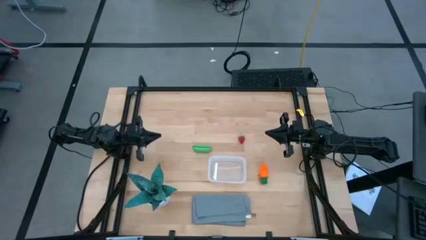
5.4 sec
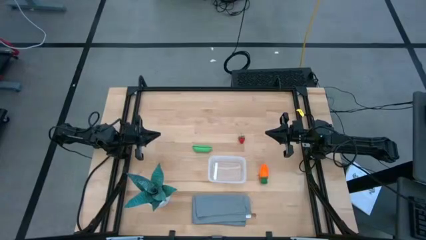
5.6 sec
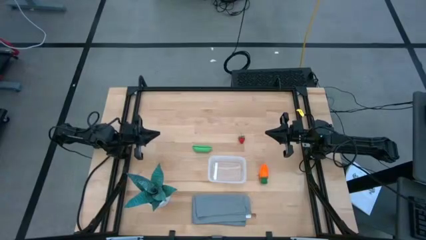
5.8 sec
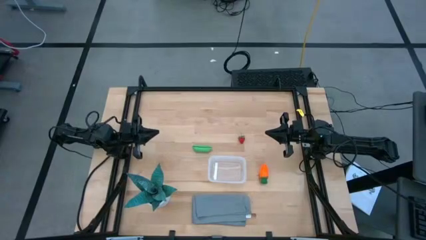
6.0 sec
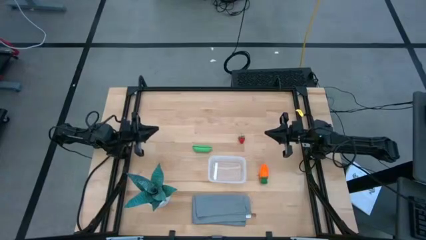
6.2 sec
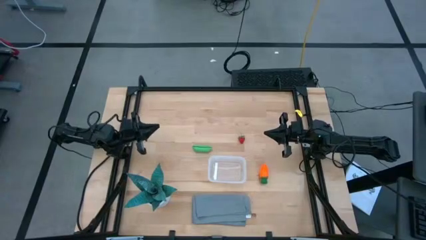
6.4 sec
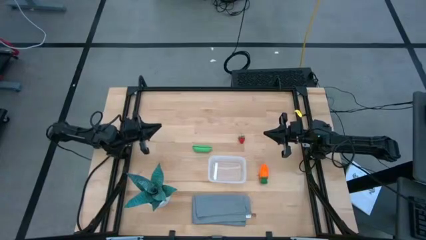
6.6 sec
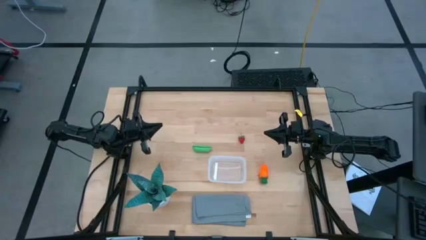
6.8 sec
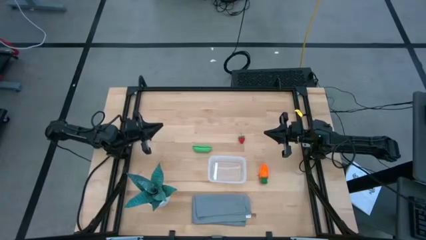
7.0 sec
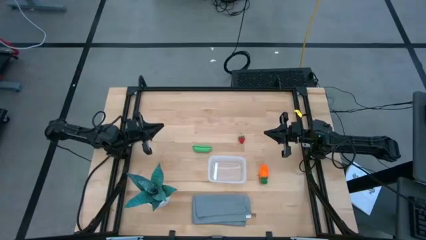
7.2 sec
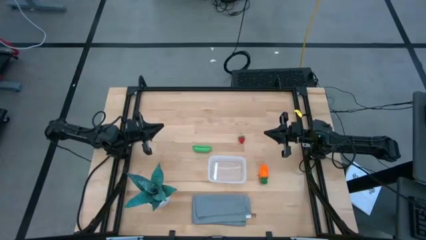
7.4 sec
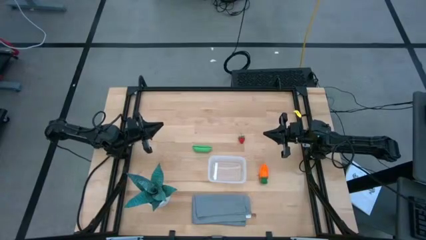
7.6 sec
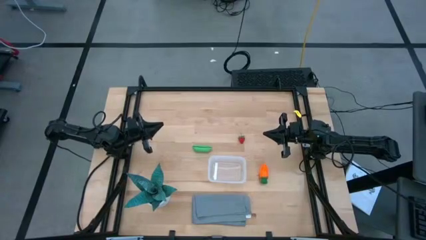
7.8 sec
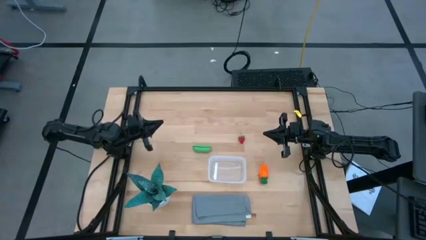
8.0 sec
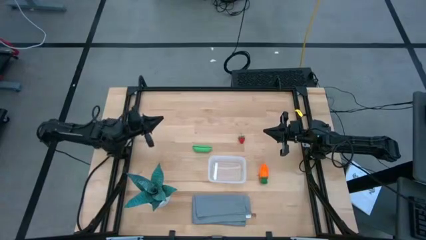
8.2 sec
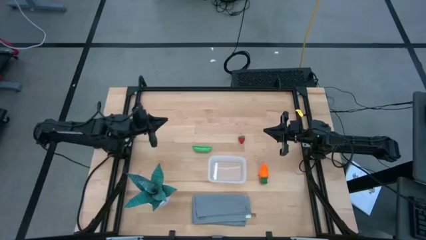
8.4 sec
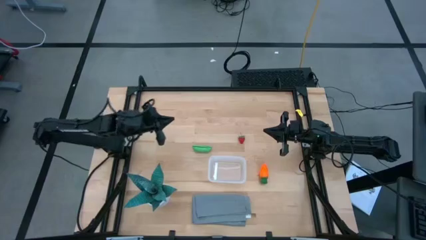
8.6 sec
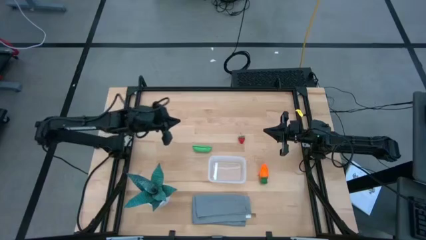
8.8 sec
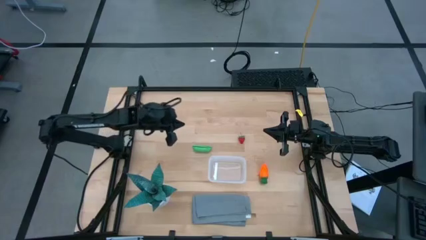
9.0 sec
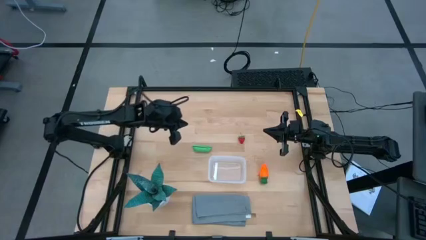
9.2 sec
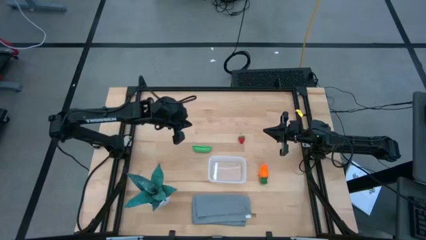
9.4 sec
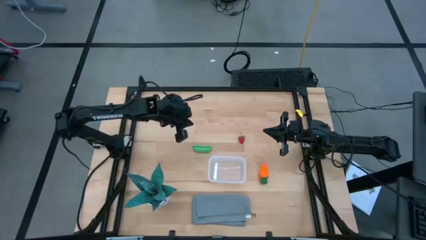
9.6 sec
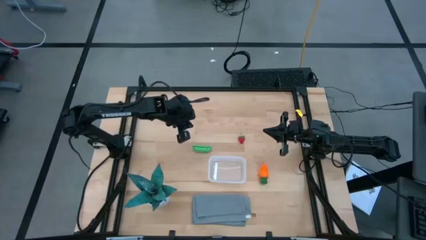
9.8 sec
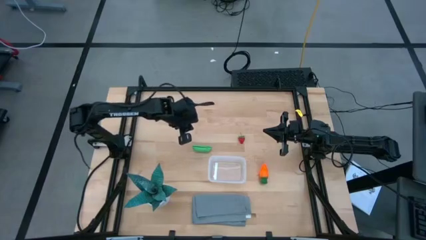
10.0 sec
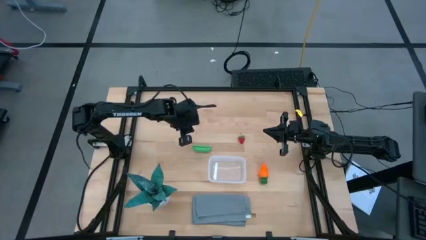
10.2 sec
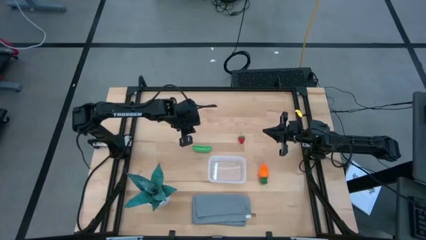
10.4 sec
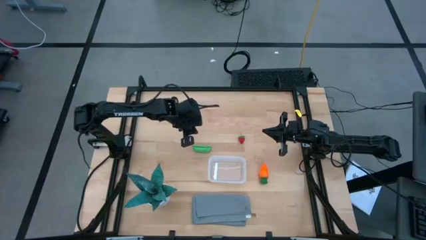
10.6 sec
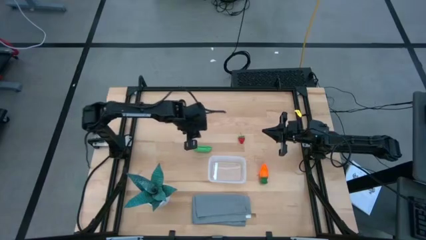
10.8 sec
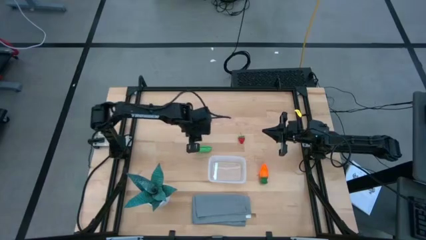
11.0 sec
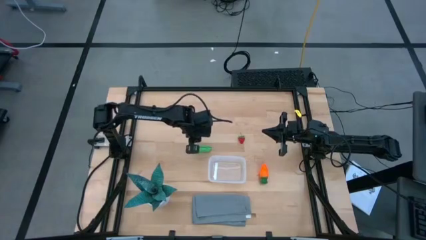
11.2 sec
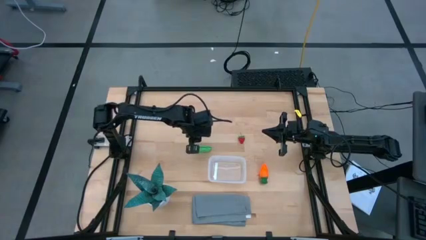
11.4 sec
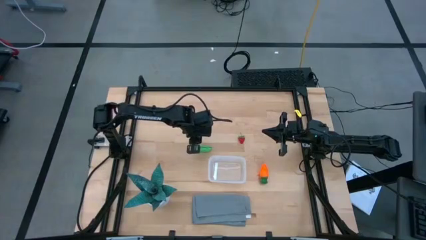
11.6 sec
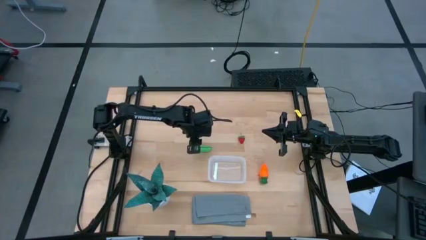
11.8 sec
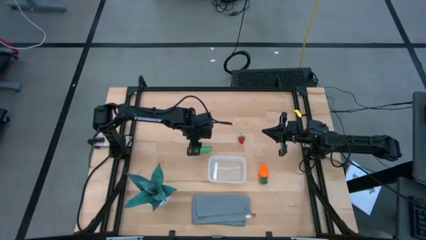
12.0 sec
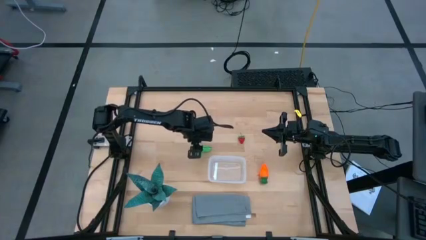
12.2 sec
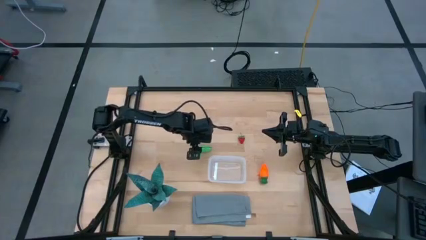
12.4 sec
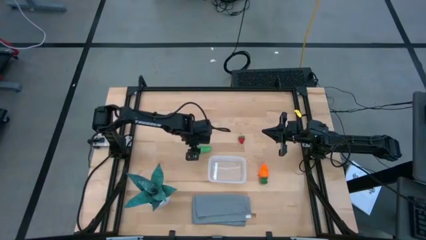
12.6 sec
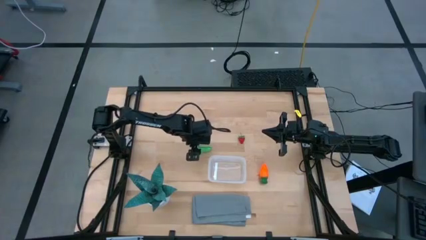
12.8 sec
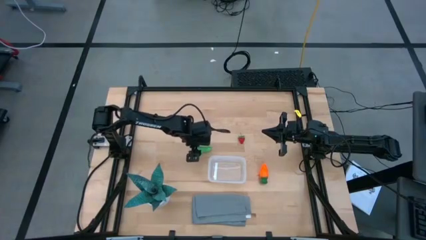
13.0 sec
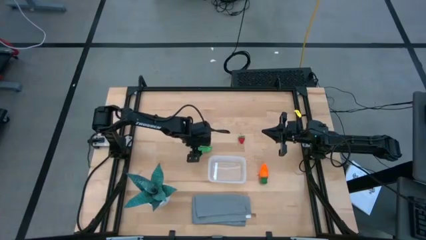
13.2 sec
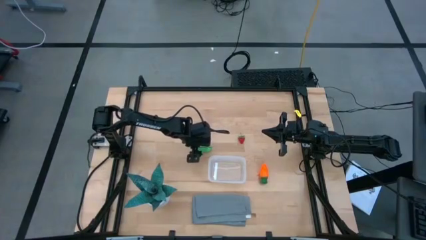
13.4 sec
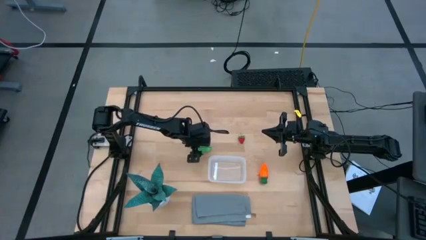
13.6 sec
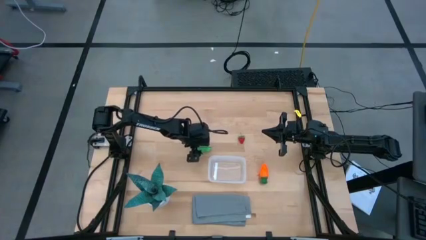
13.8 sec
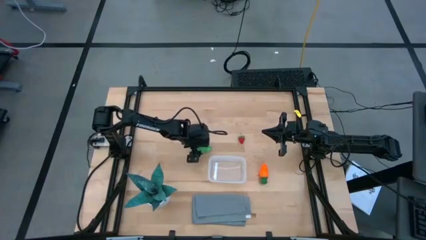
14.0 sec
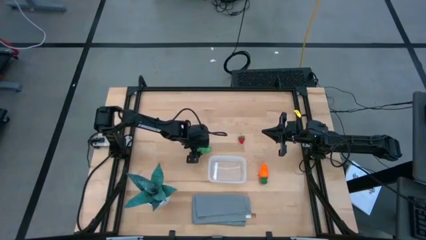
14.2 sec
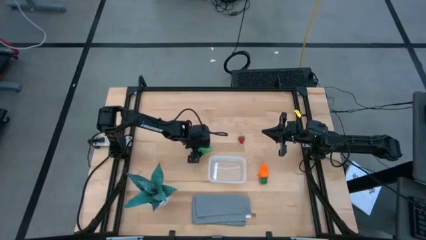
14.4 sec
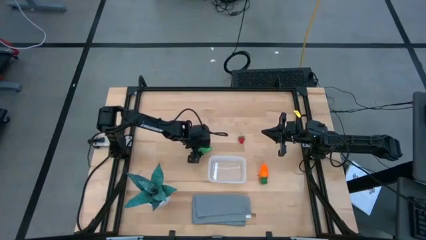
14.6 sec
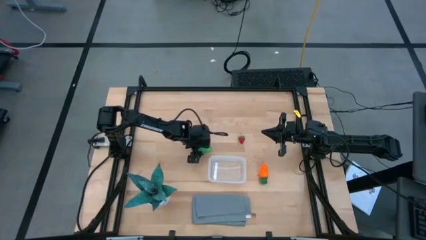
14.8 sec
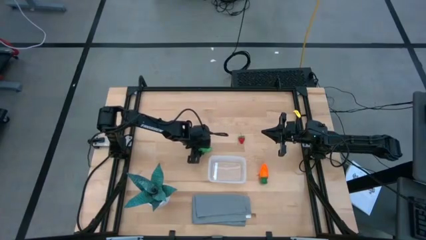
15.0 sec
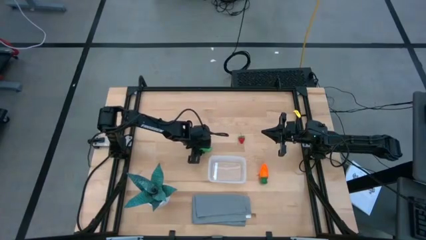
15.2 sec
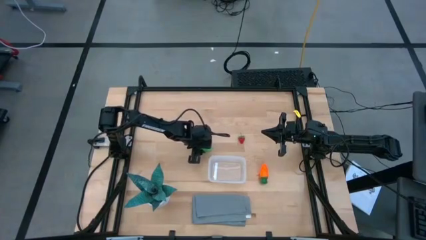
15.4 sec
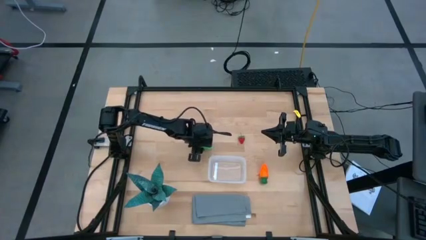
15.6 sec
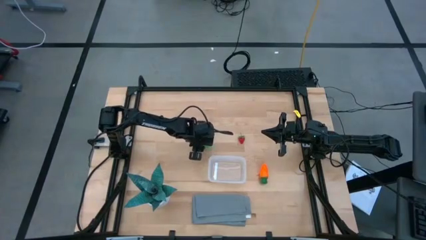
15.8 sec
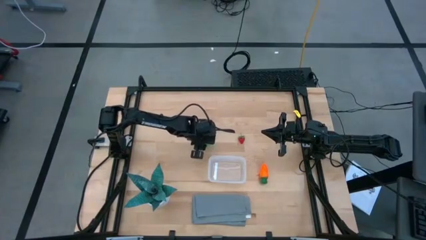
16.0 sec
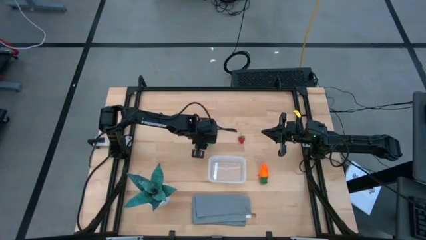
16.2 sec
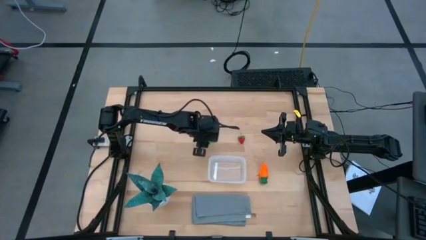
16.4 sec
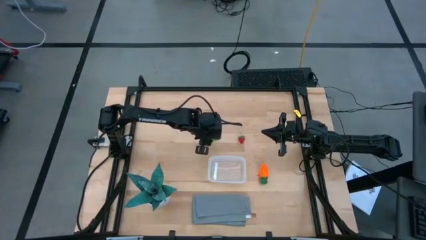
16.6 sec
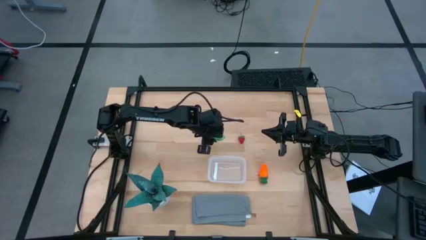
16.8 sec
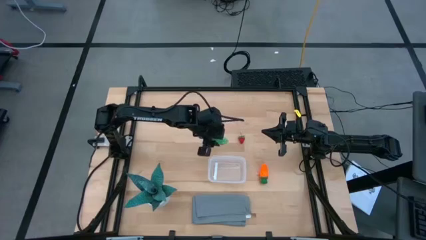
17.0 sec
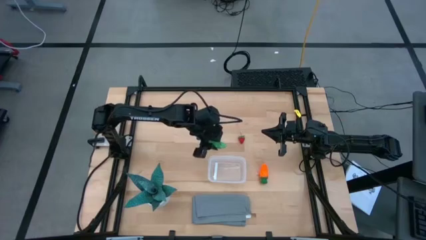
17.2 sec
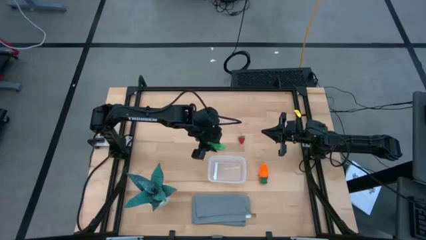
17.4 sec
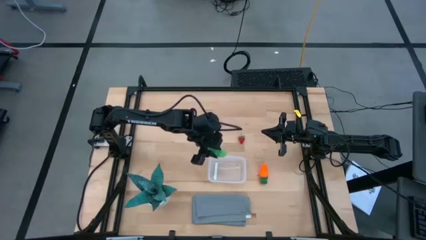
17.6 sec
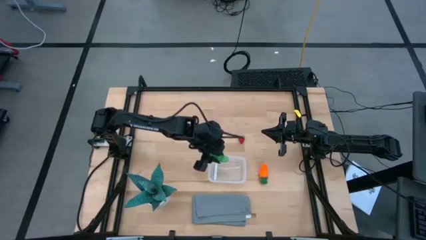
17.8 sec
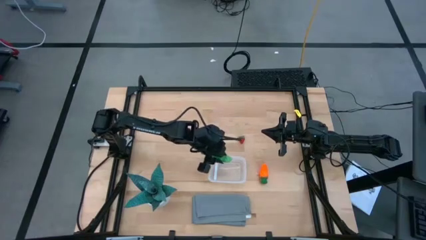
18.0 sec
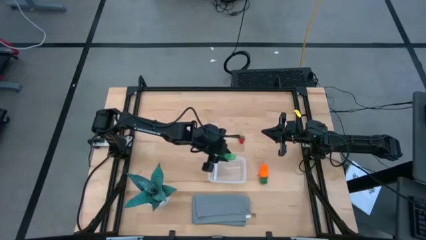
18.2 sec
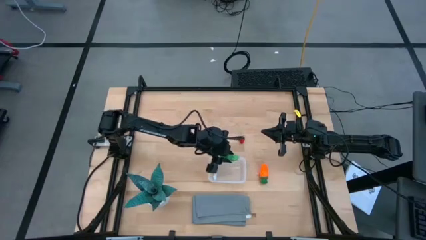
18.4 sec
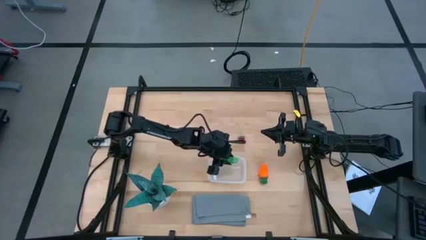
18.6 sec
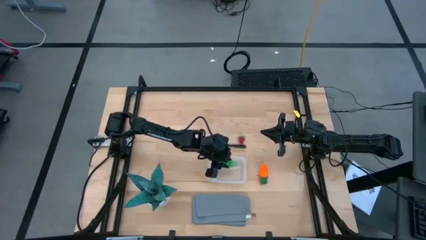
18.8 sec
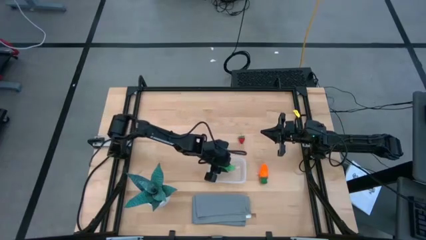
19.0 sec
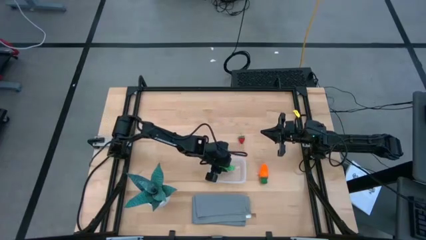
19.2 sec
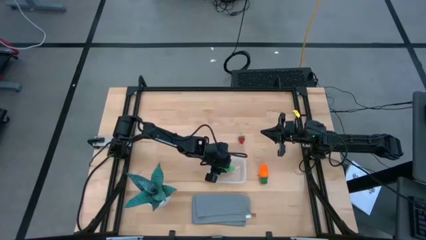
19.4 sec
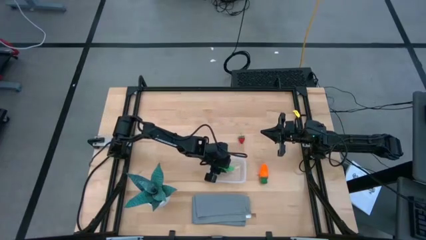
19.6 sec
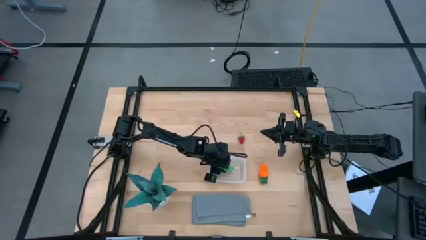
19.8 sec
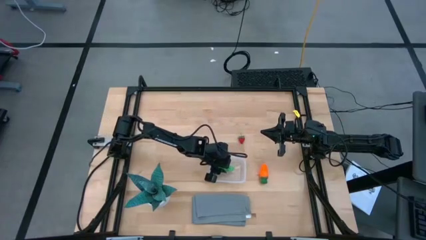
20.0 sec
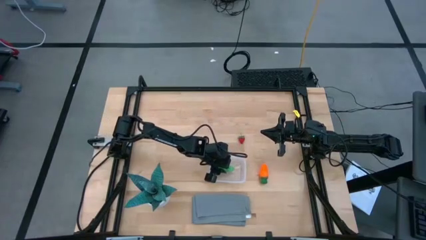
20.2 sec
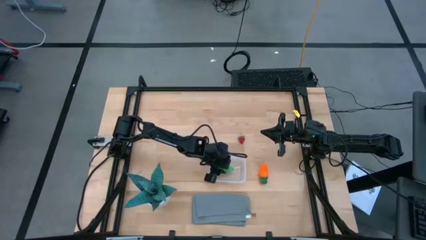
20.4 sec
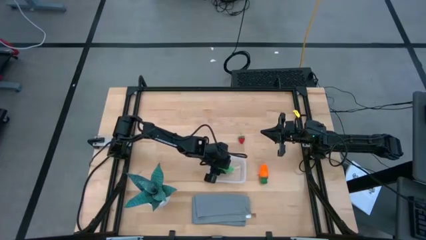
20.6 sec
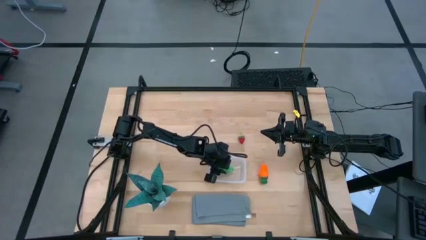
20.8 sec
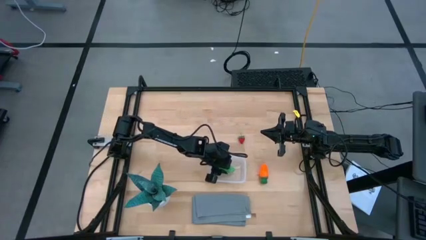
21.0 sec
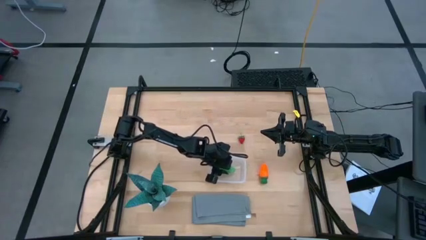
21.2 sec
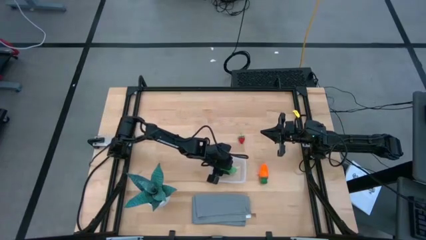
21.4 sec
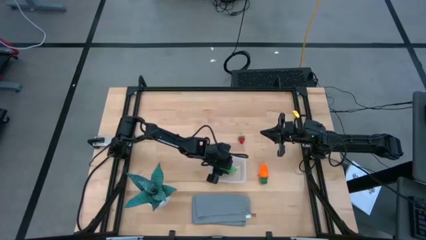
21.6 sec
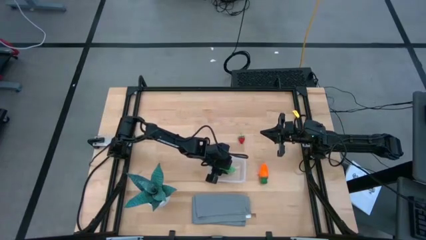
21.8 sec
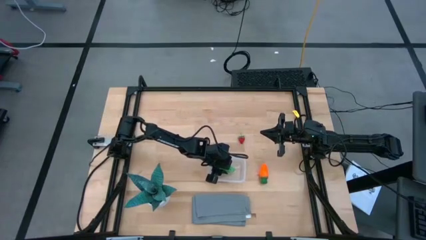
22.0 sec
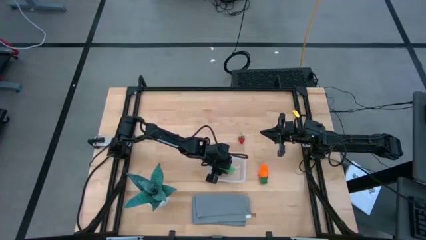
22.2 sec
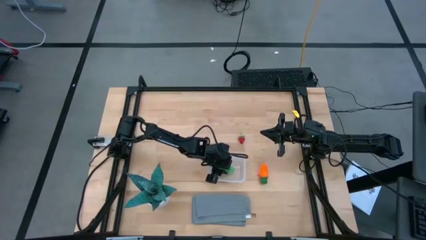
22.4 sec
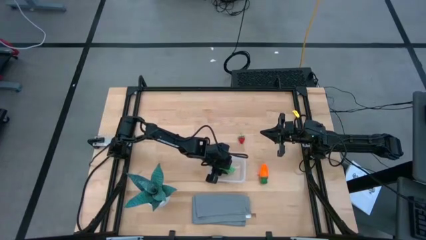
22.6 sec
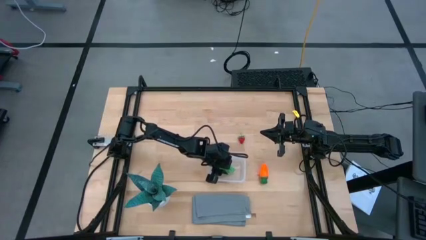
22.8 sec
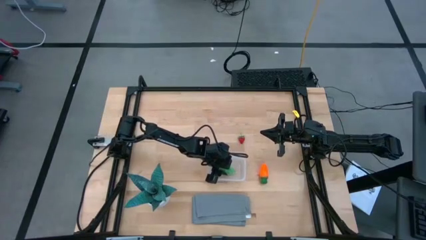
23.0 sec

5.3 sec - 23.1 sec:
Task: Pick and placing Produce into tupperware
Put the green peas into the transparent bin
